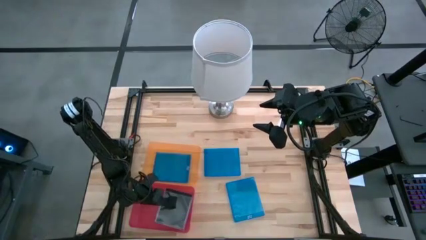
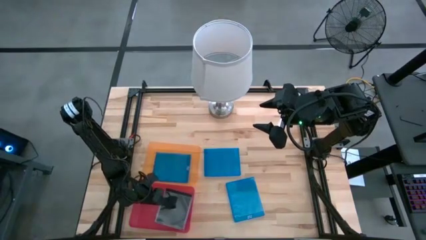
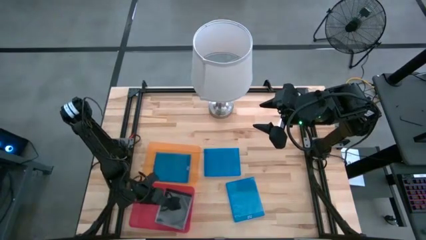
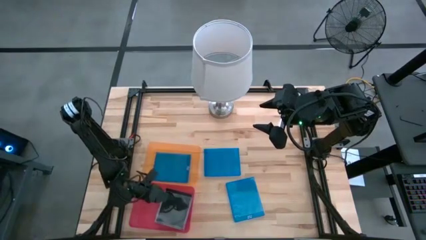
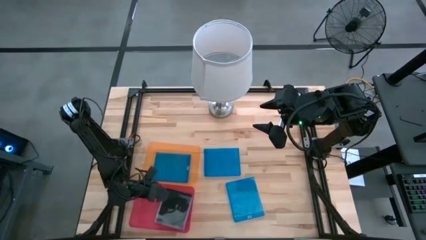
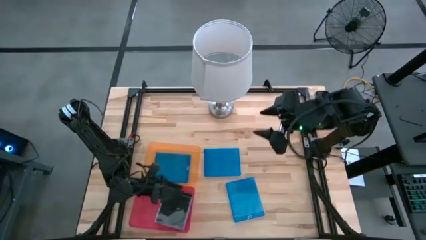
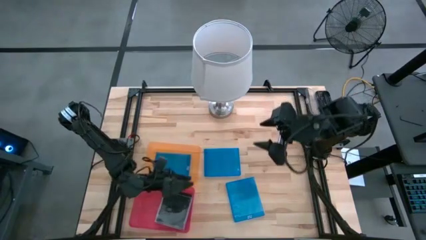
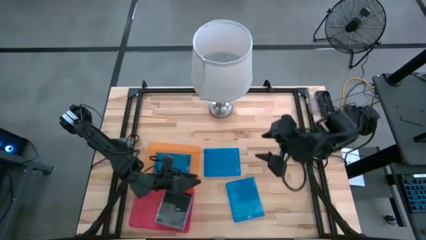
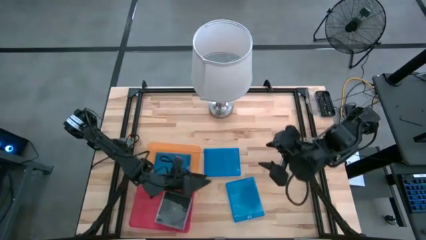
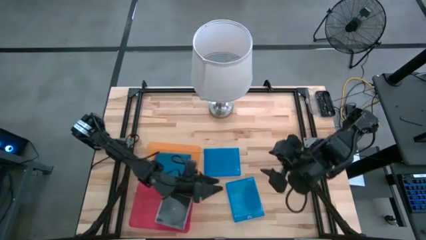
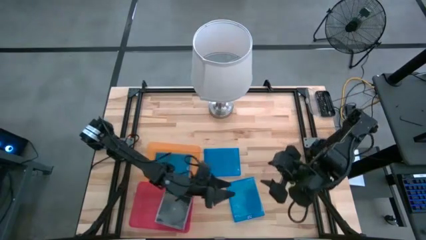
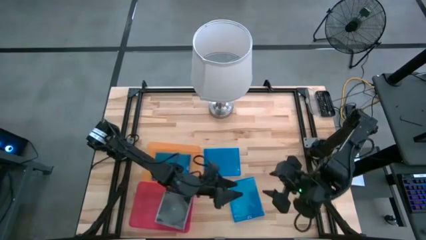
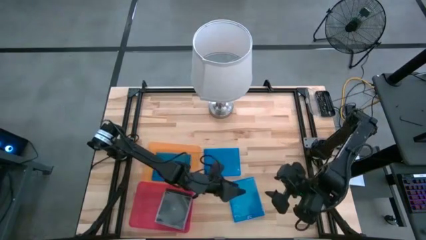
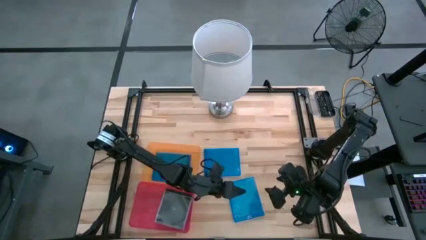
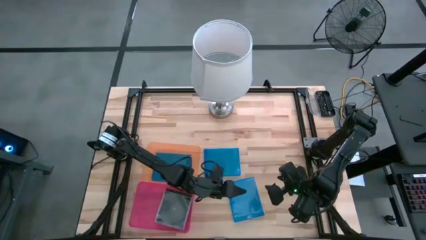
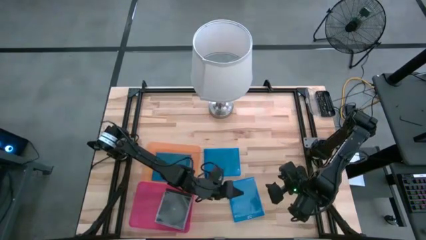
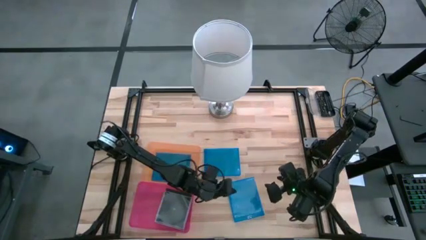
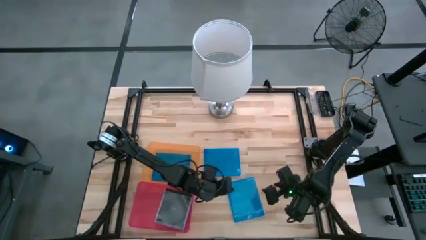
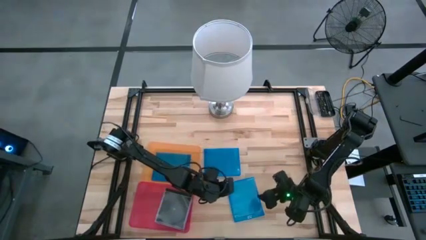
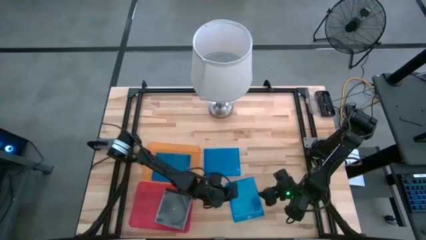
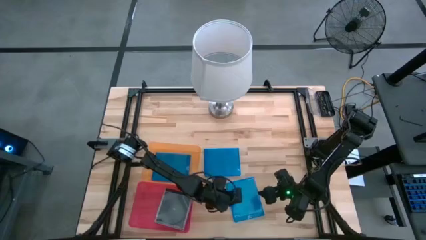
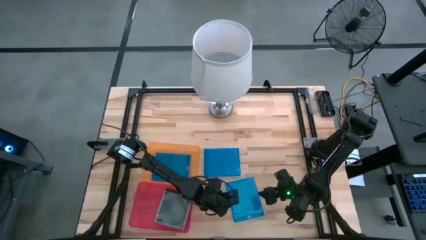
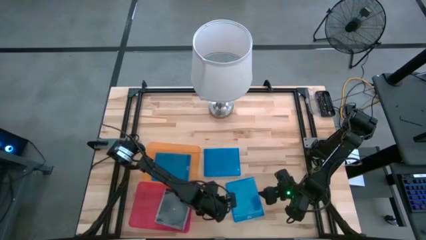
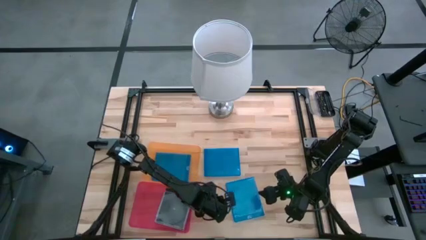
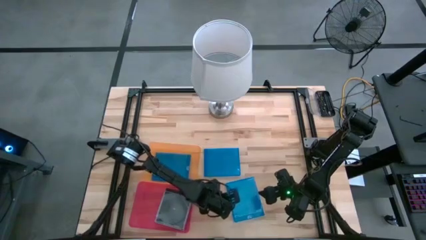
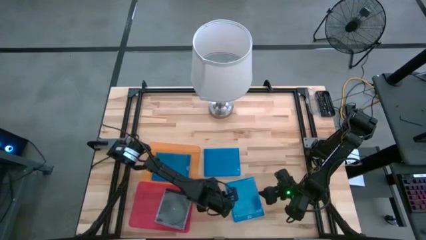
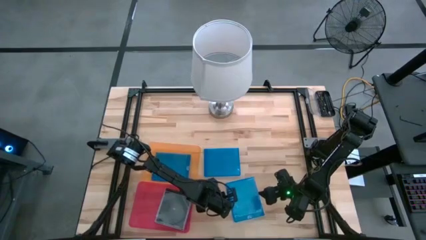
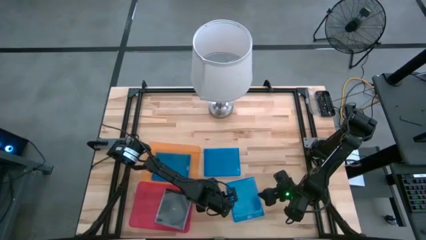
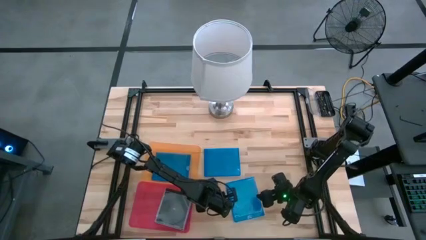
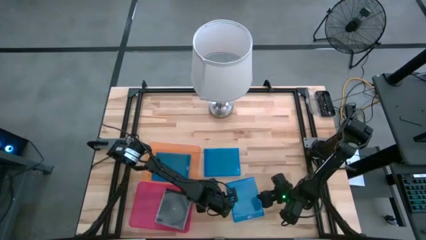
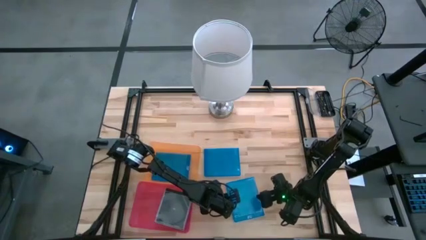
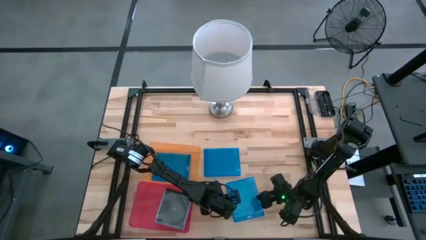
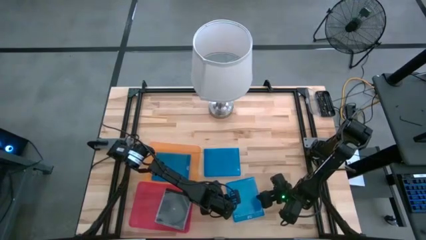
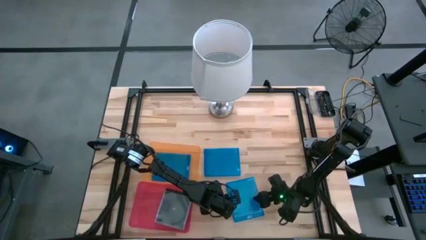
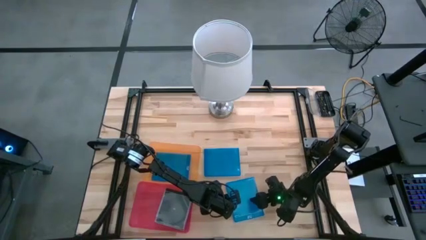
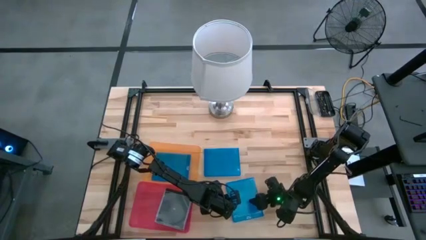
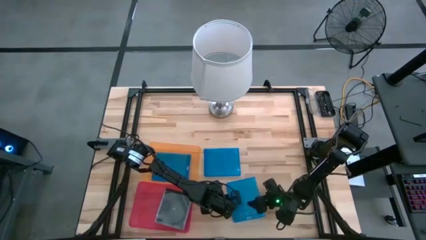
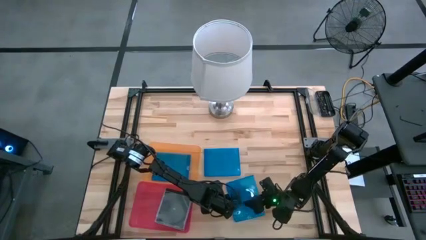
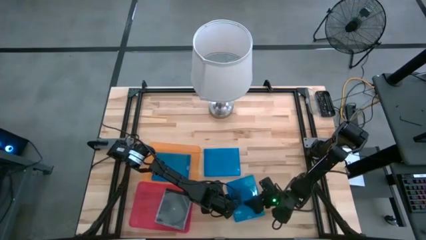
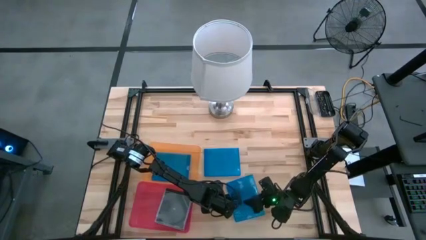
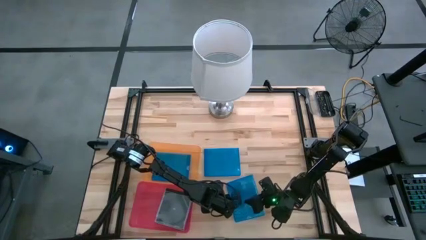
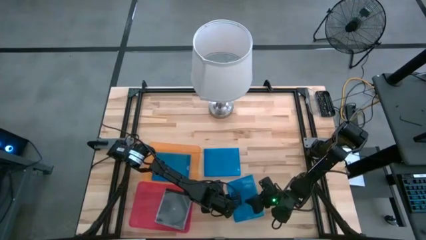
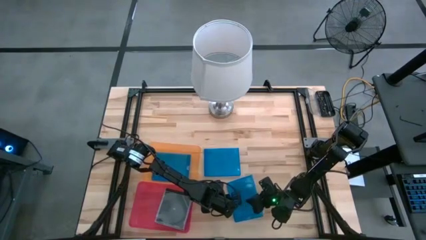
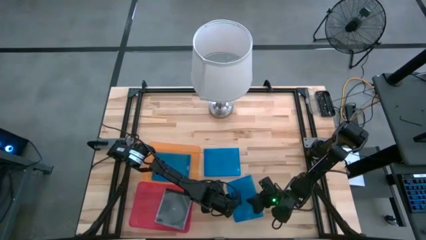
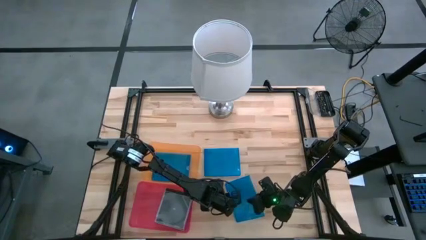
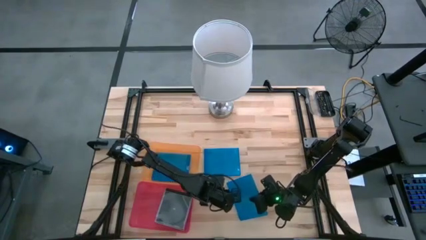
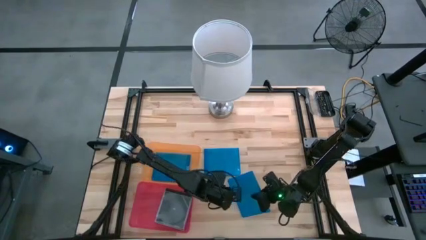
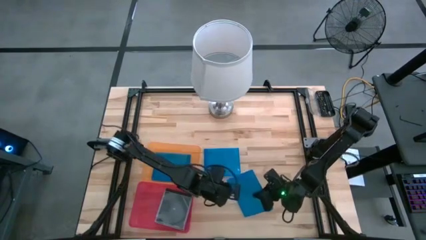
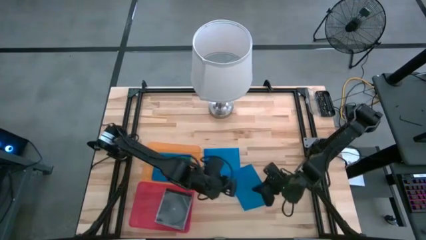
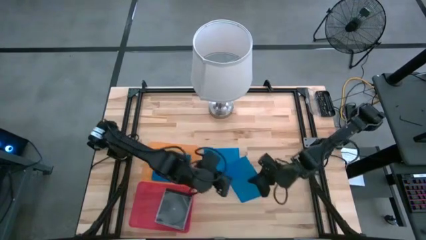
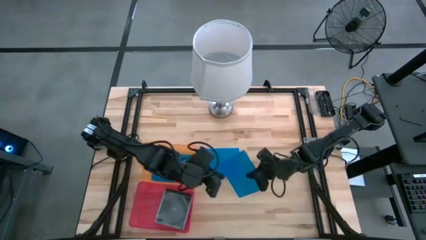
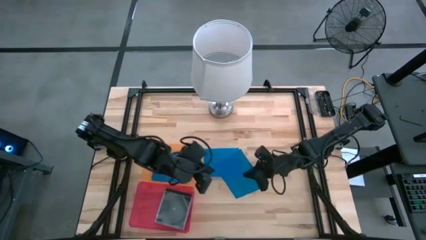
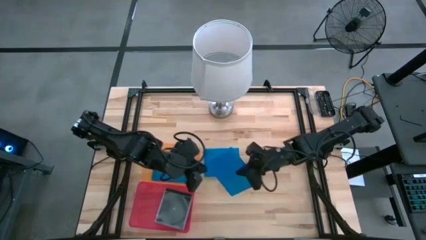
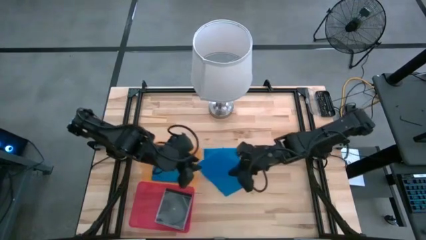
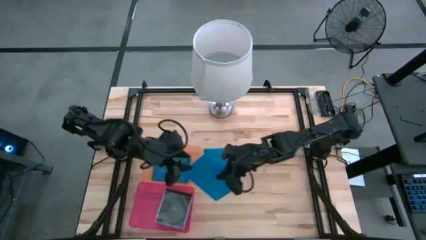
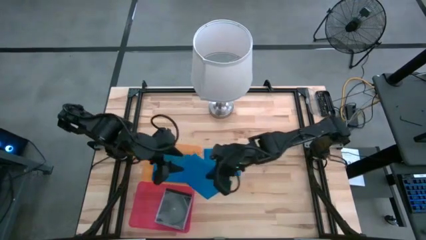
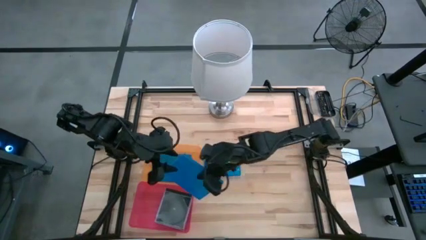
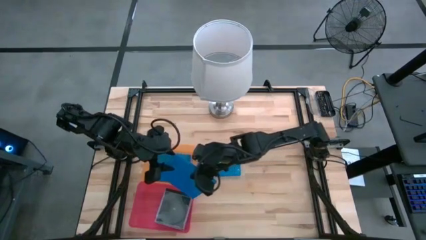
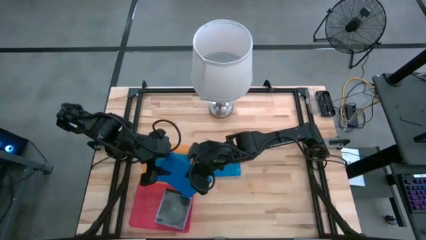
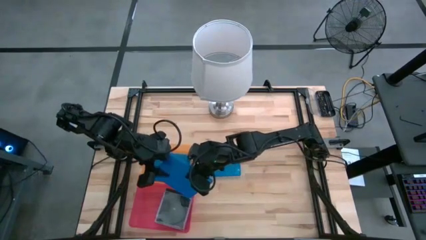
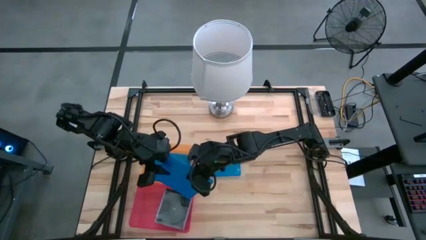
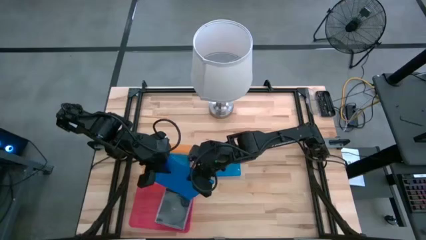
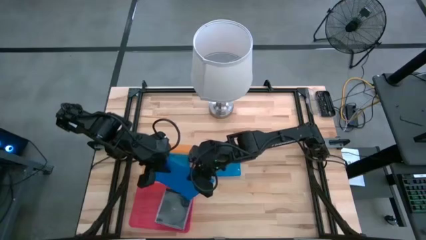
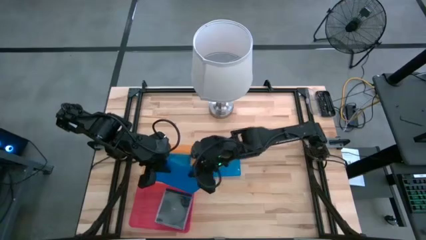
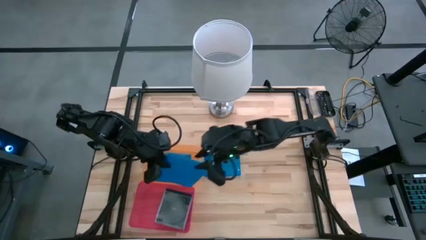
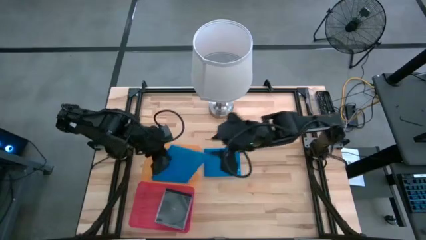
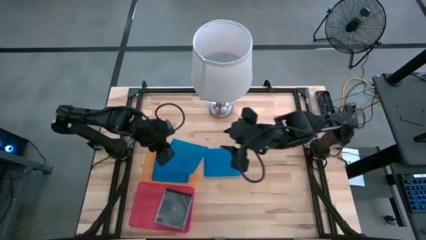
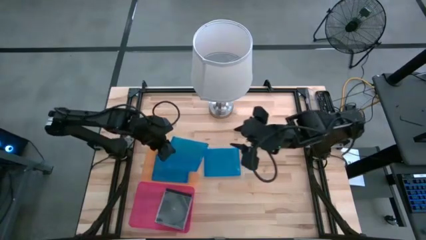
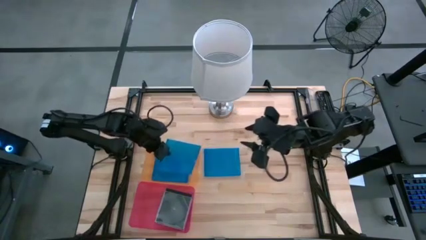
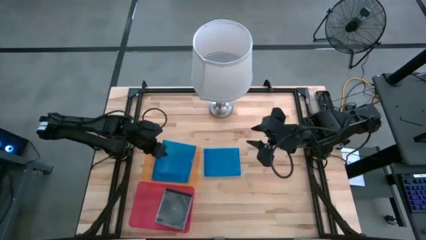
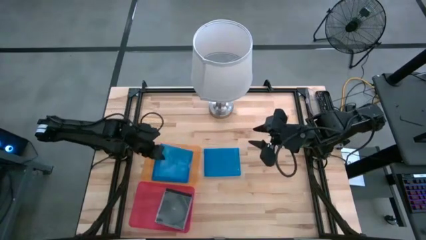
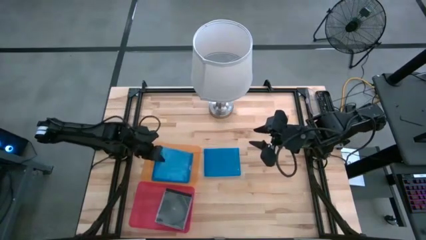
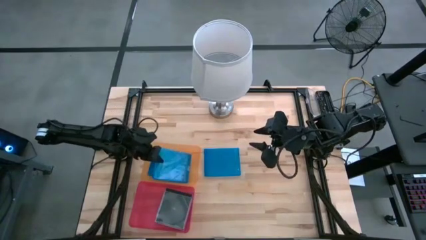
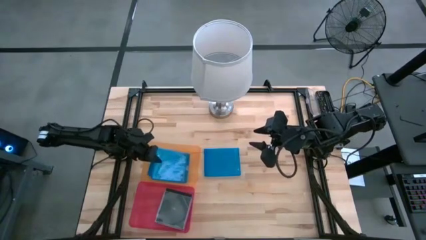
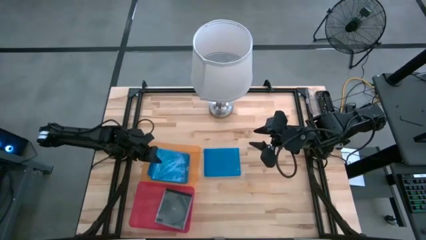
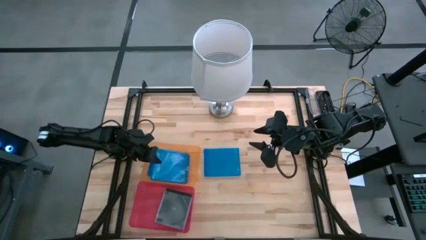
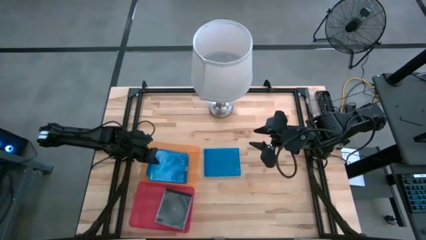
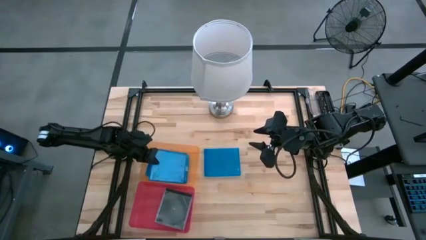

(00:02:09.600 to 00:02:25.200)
Task: Pick & place jewel cases by type
Put the bottom blue CD case into the orange bin

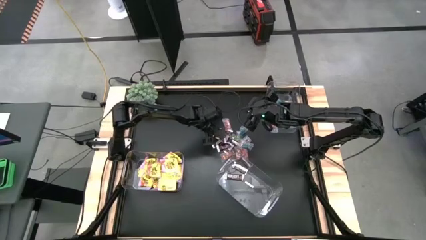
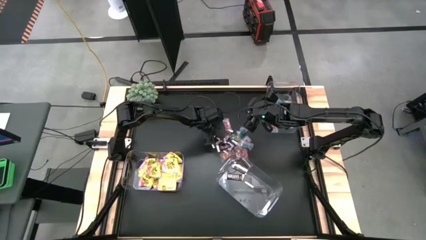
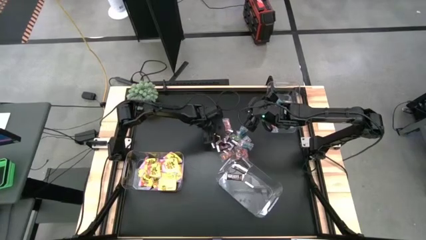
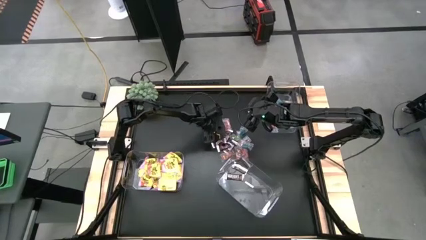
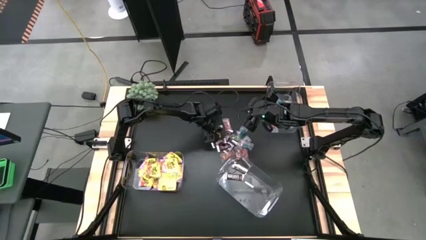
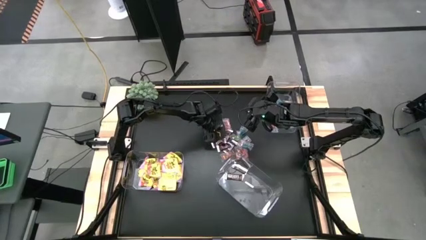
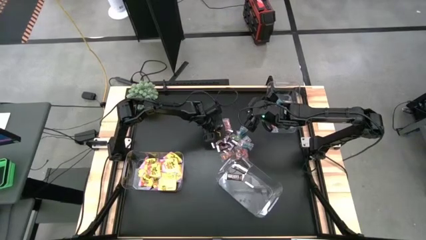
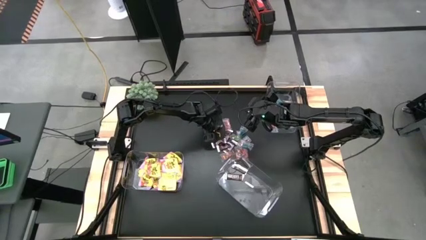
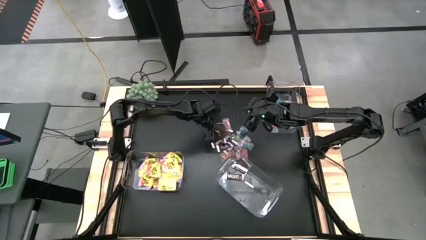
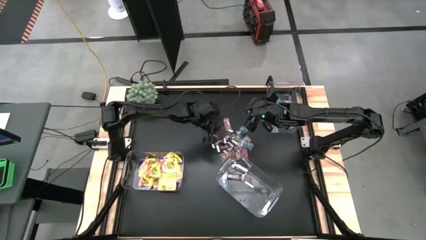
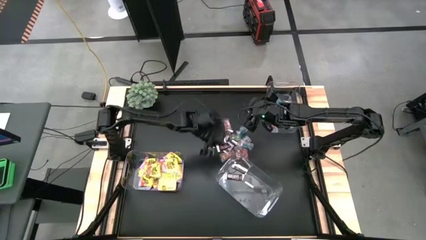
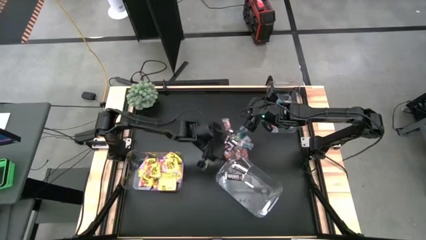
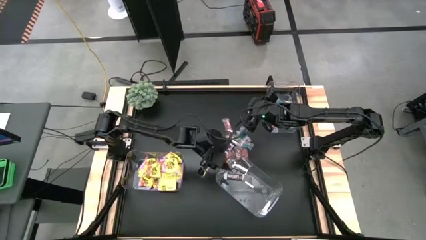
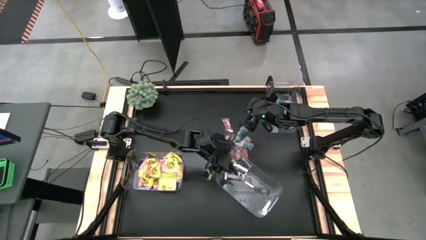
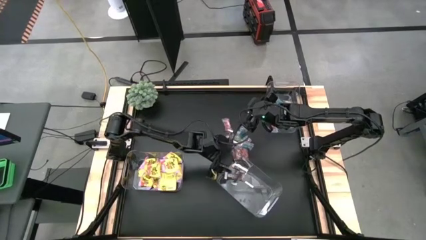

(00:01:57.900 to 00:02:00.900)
Task: Sort candy
Put the brown candy in the bottom right transparent container
